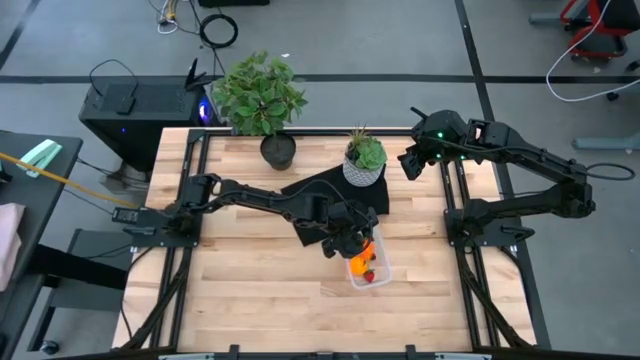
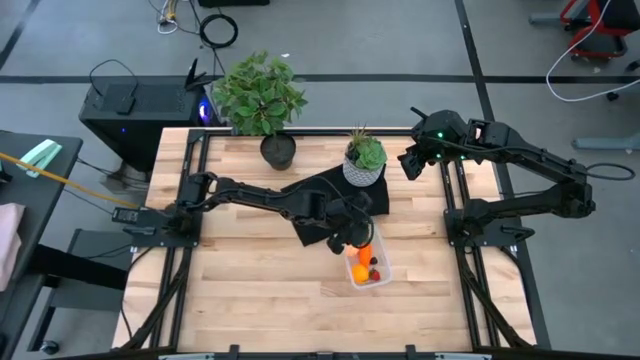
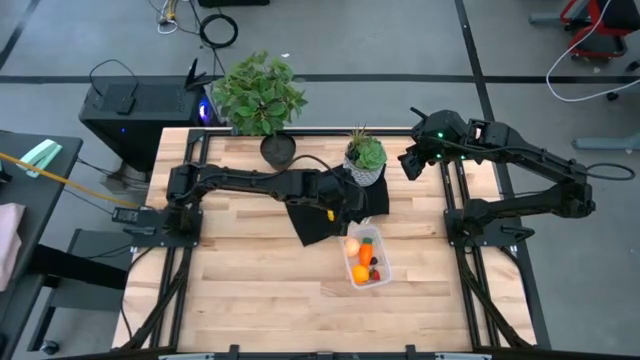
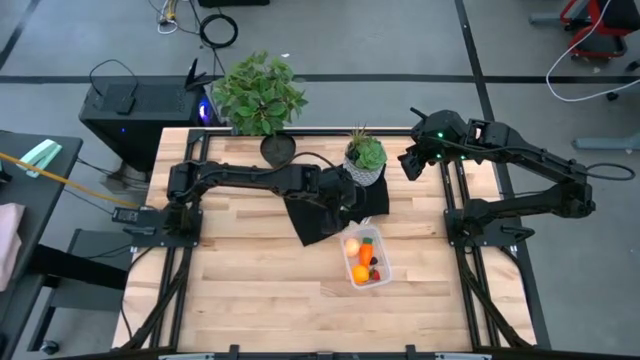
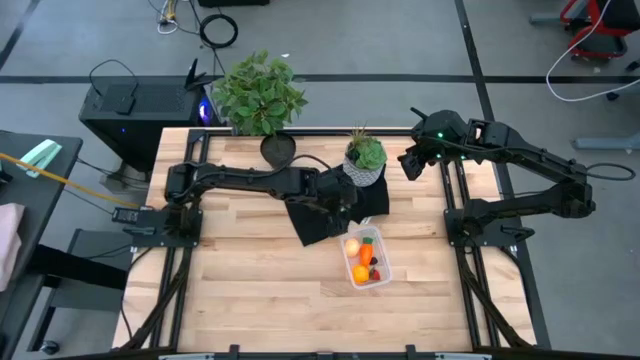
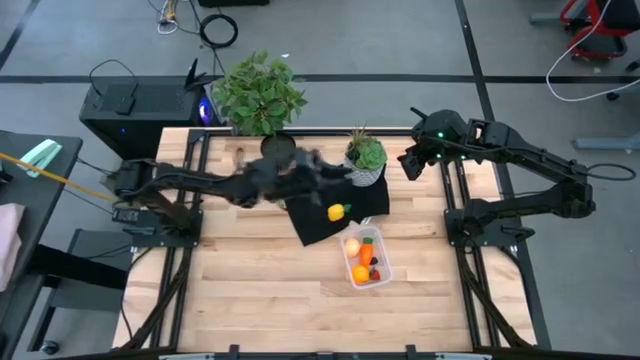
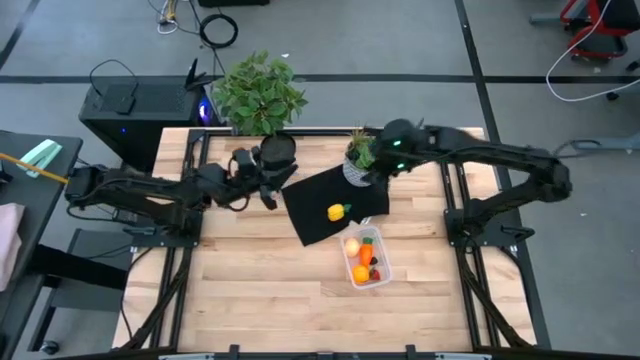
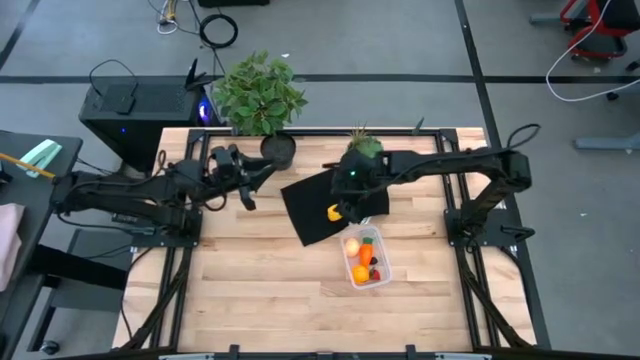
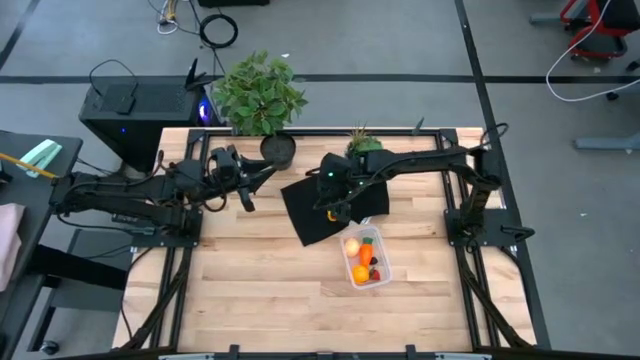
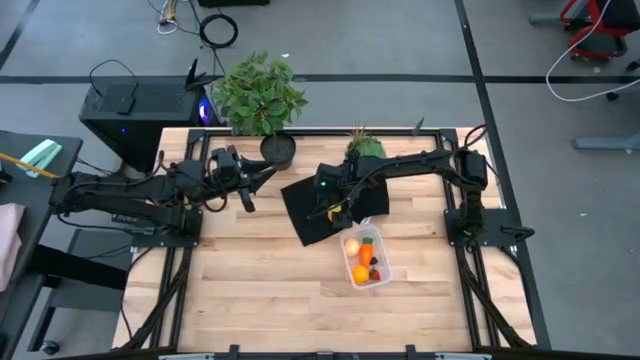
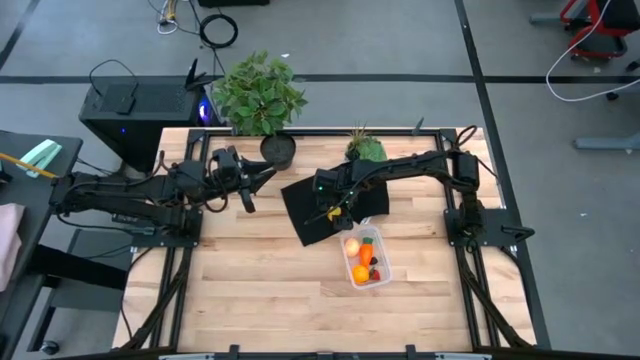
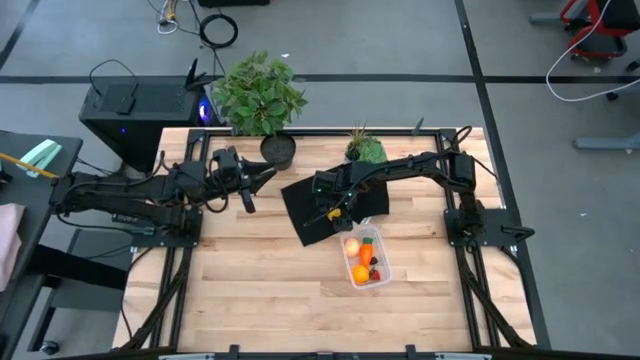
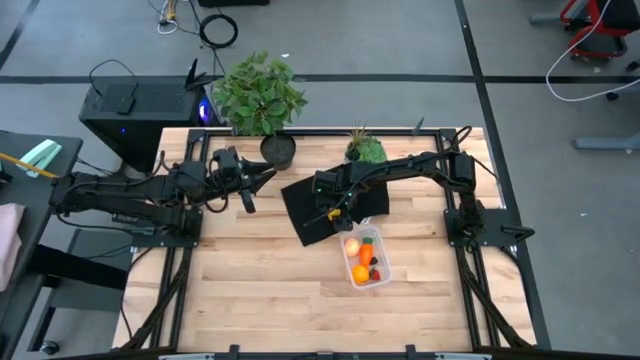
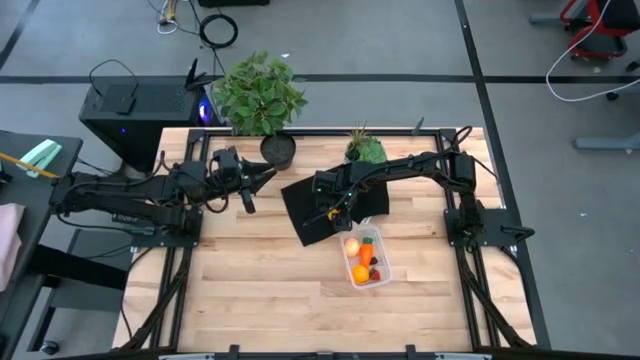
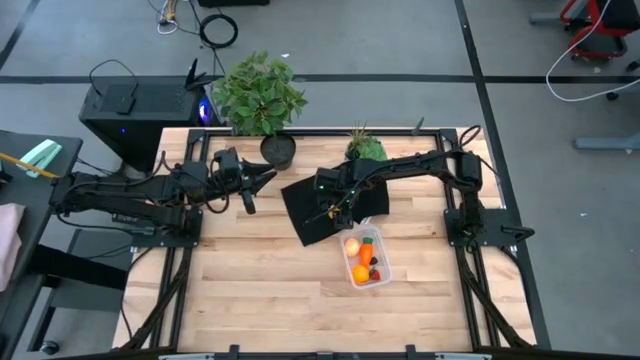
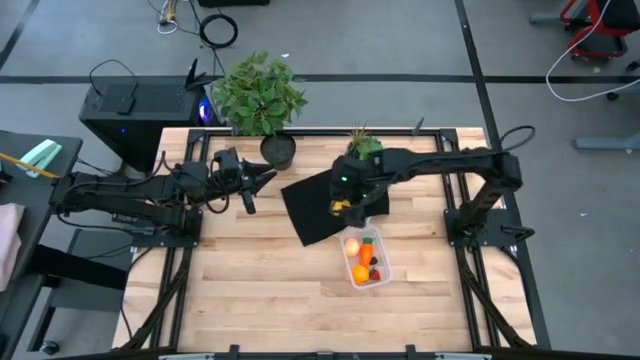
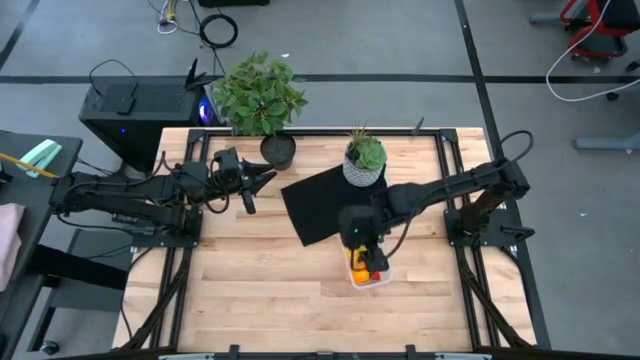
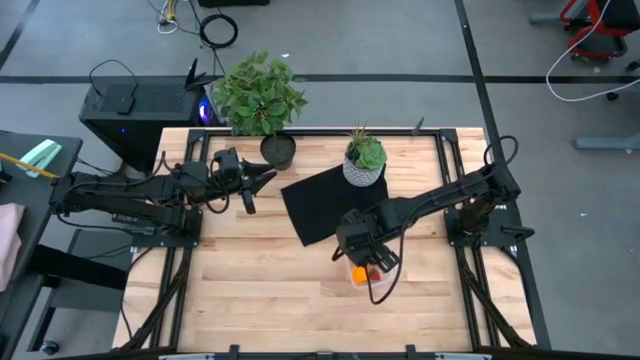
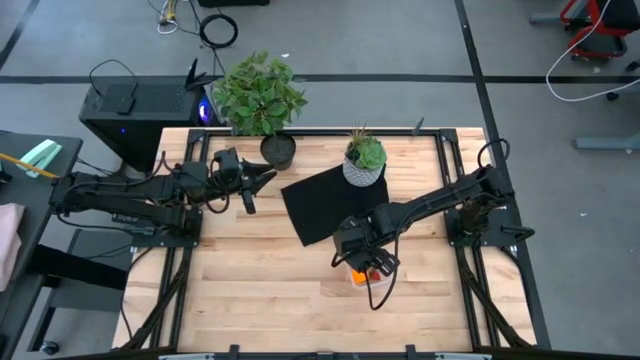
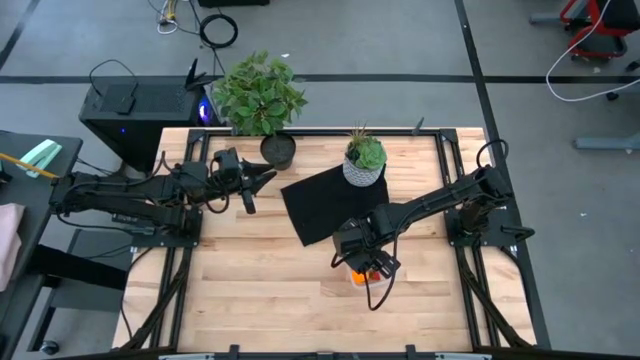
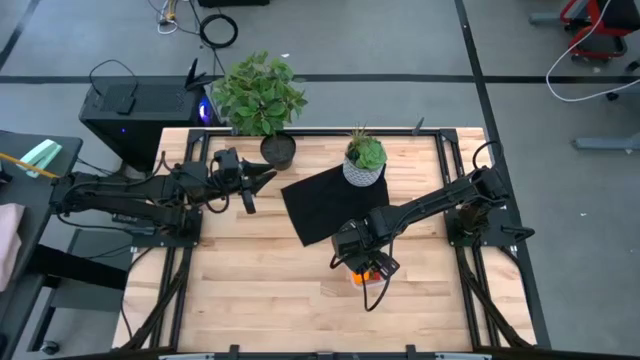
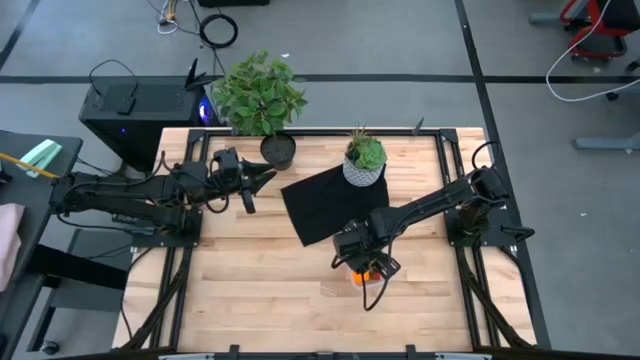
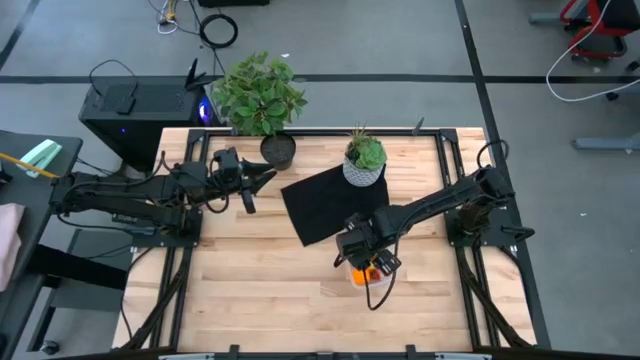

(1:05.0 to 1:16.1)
Task: Pick and placing Produce into tupperware
Put the pineapple into the transparent bin

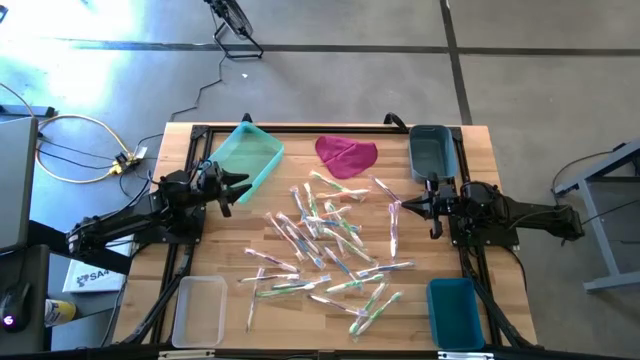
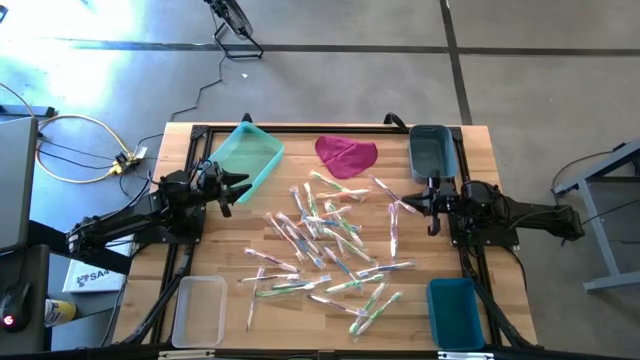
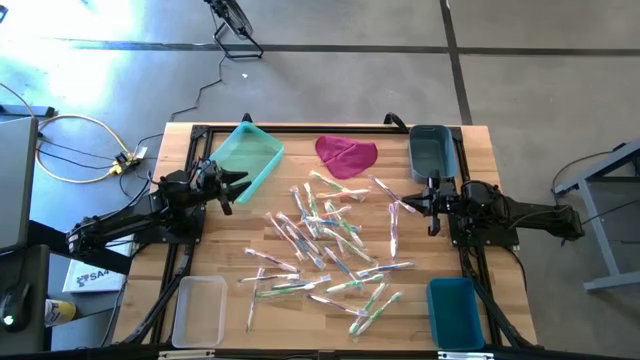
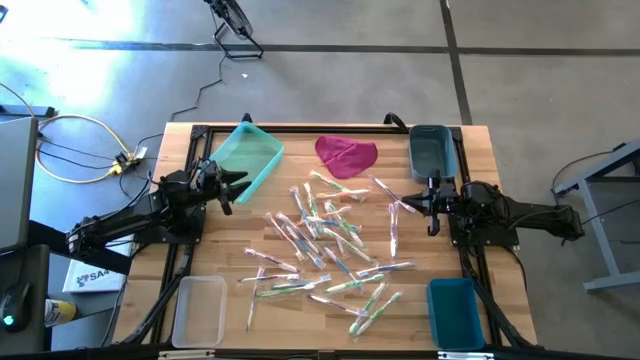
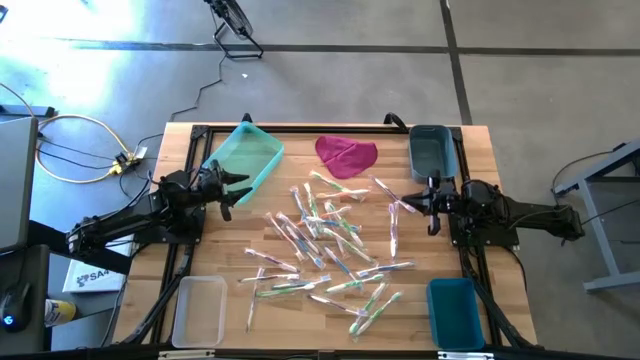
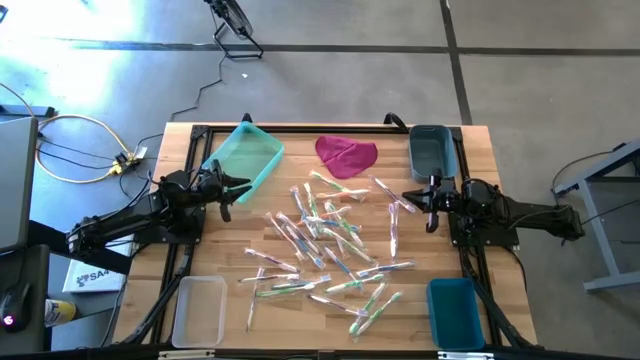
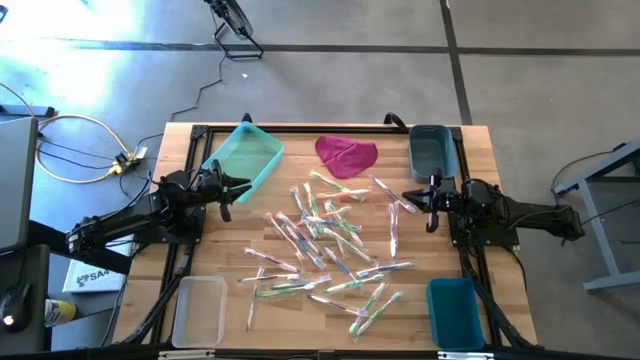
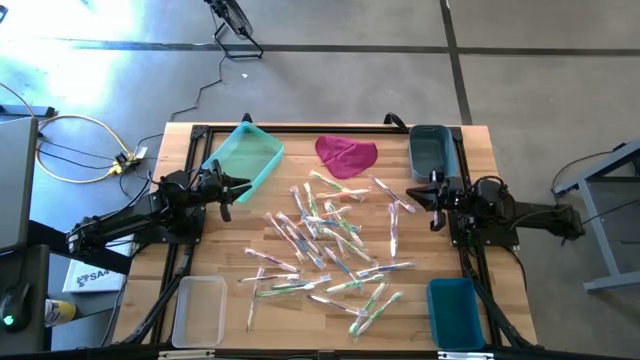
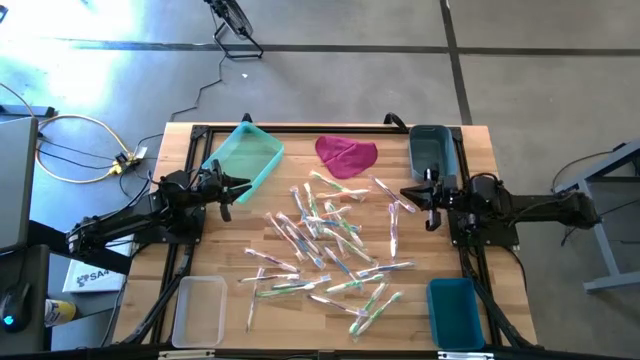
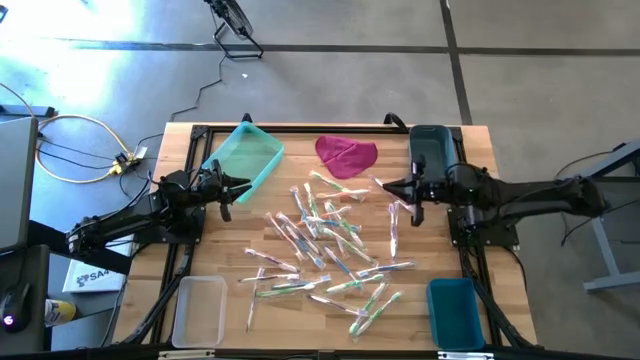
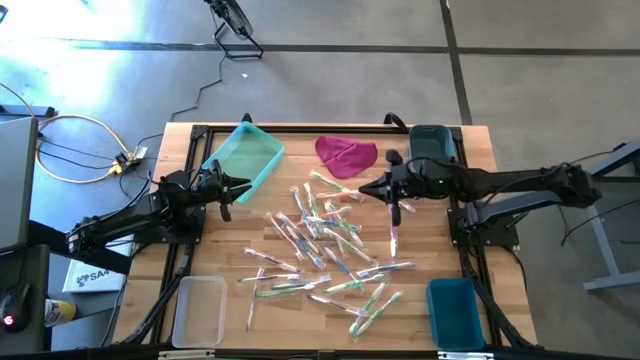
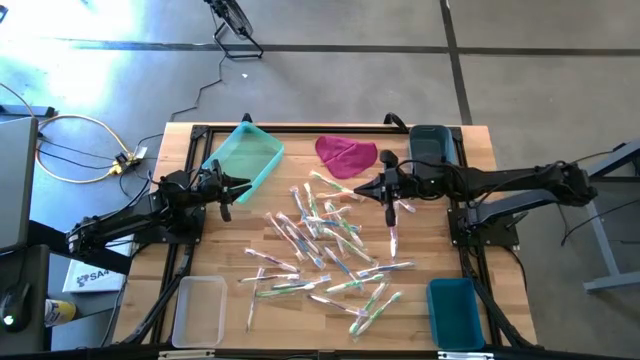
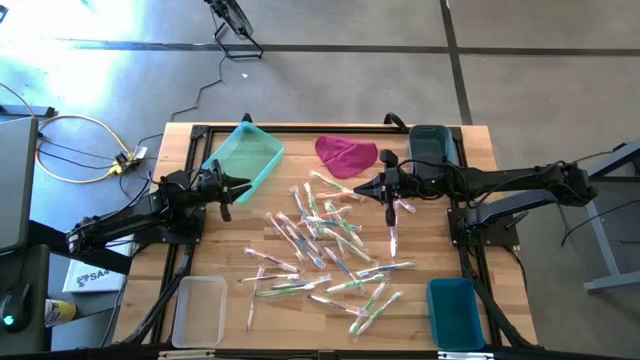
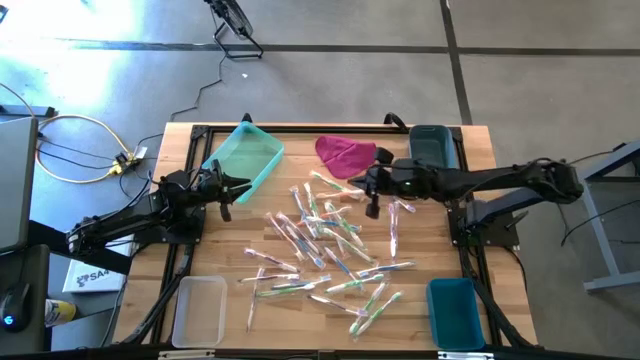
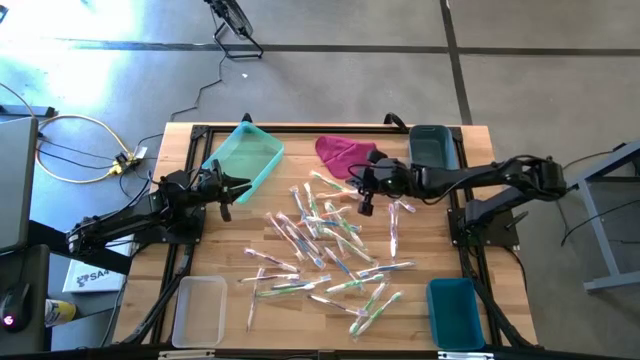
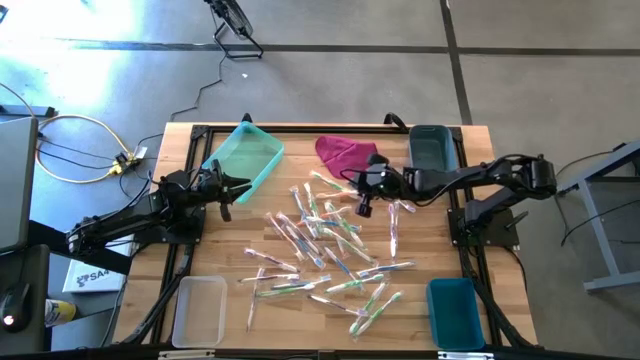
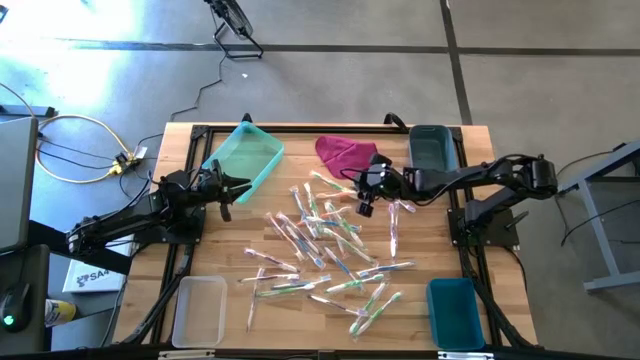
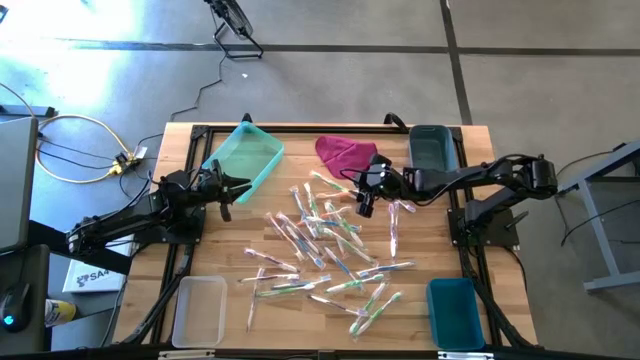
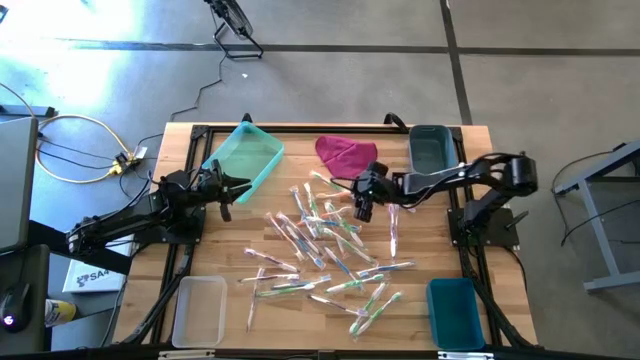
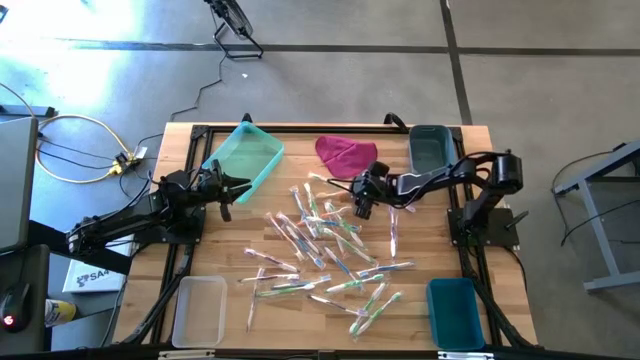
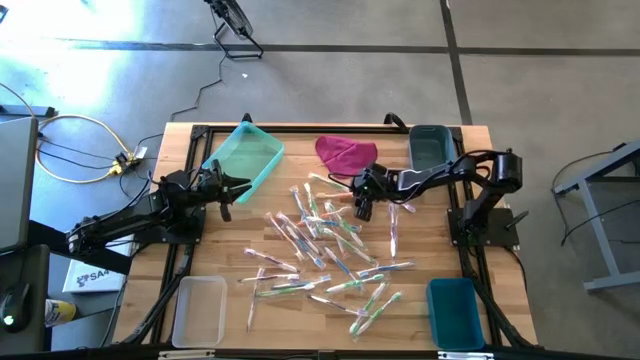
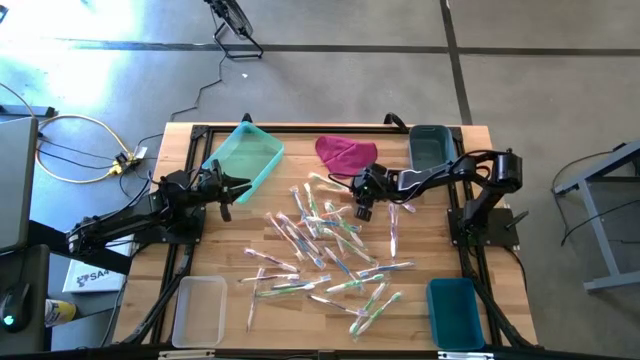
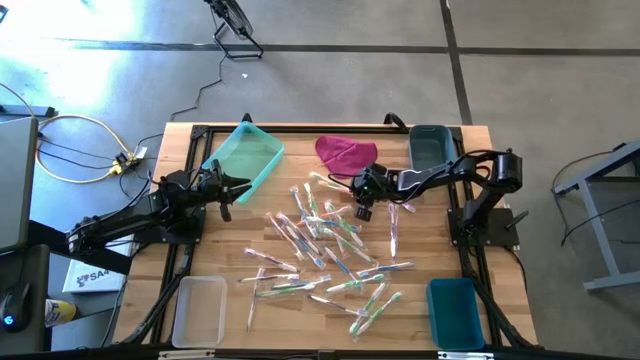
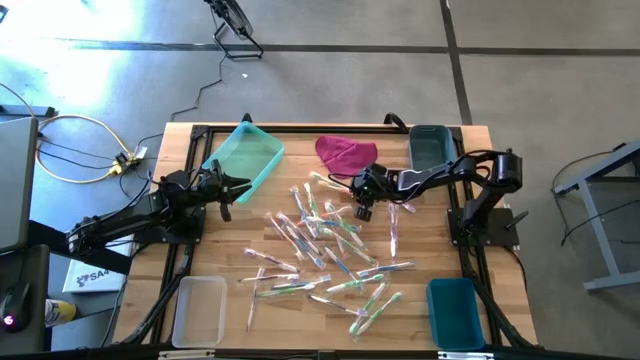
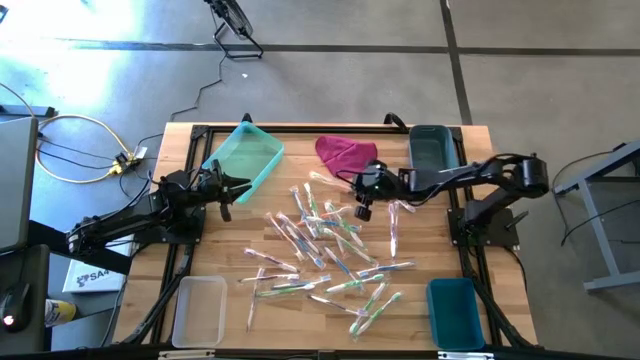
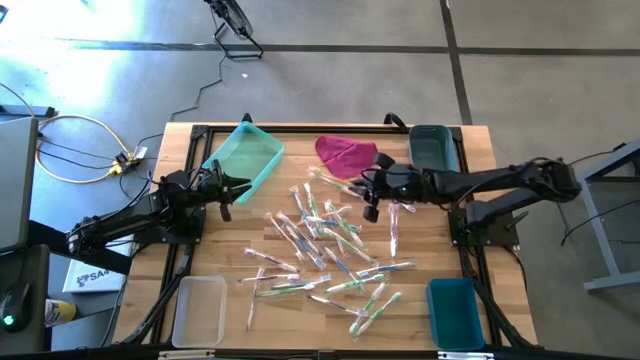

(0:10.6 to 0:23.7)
Task: Pick & Place Toothbrushes
Put the orange toothbrush to the transparent bin
